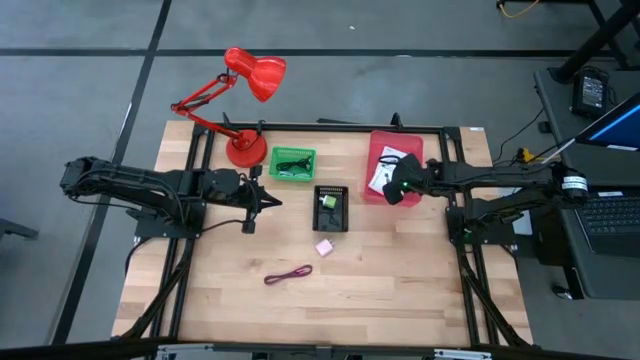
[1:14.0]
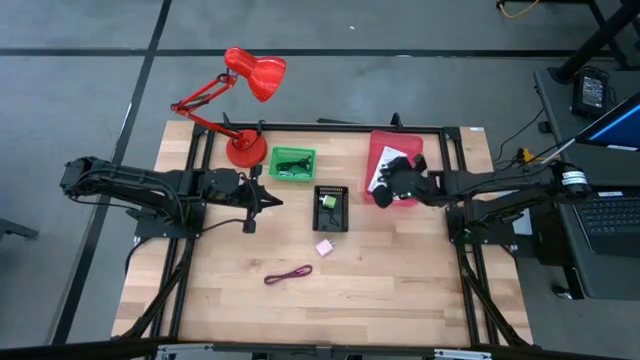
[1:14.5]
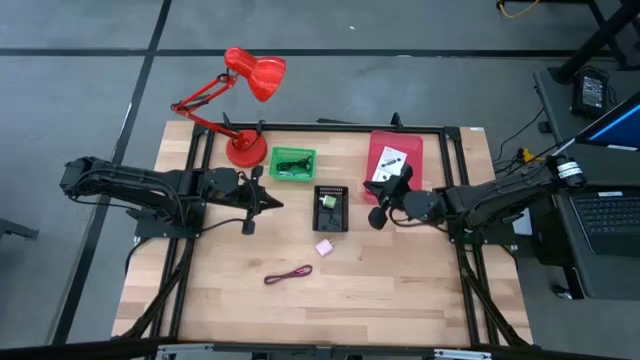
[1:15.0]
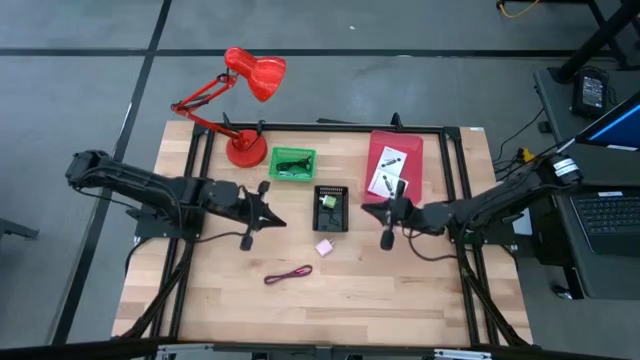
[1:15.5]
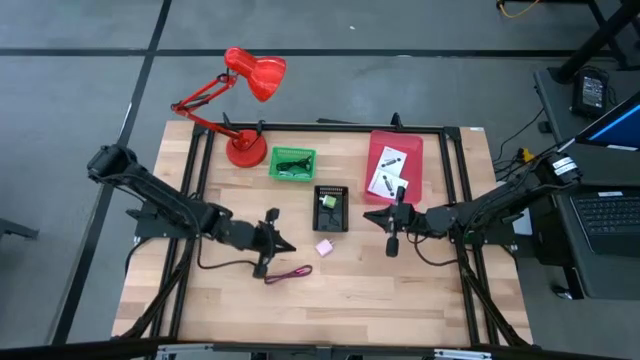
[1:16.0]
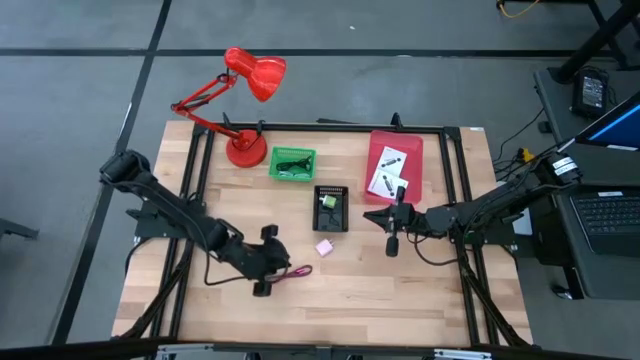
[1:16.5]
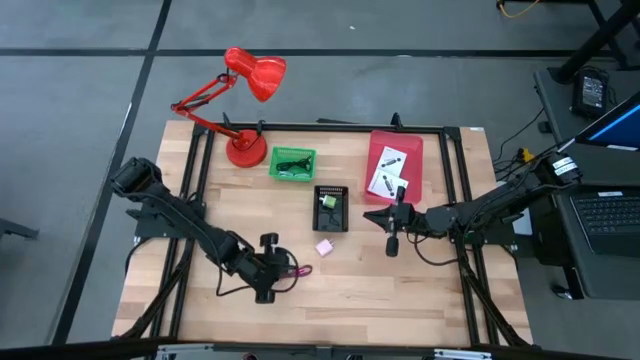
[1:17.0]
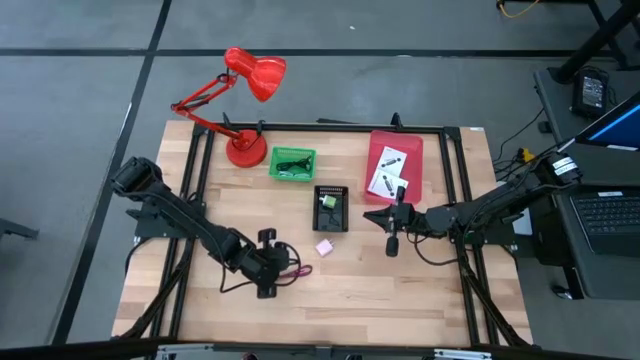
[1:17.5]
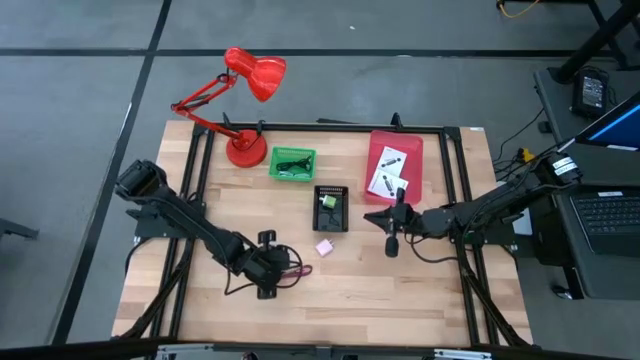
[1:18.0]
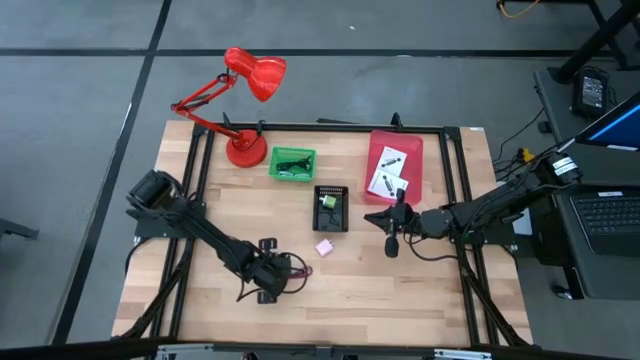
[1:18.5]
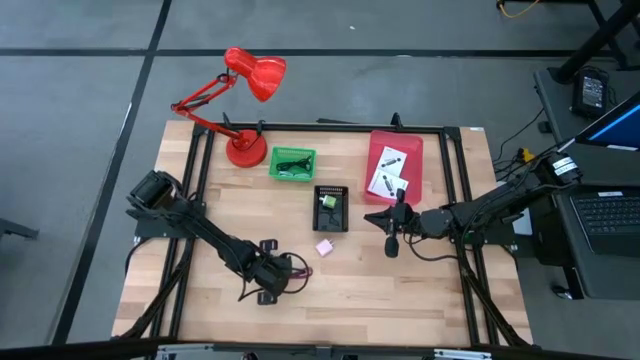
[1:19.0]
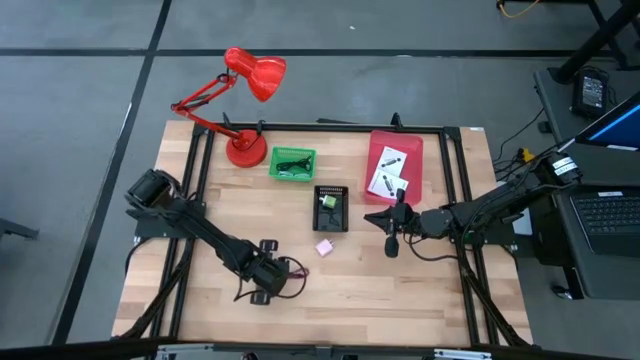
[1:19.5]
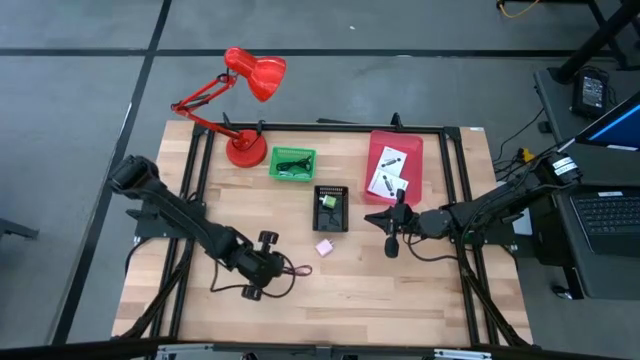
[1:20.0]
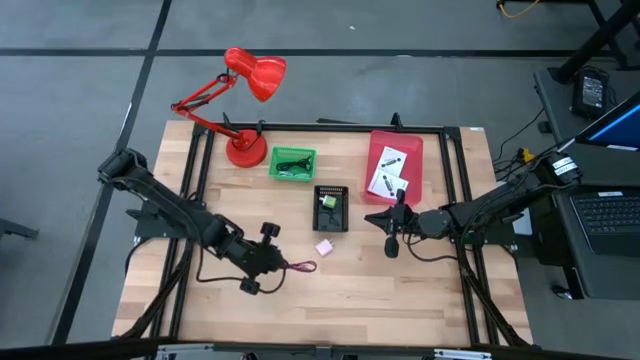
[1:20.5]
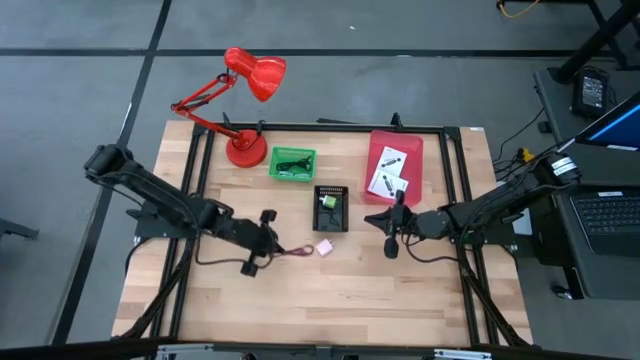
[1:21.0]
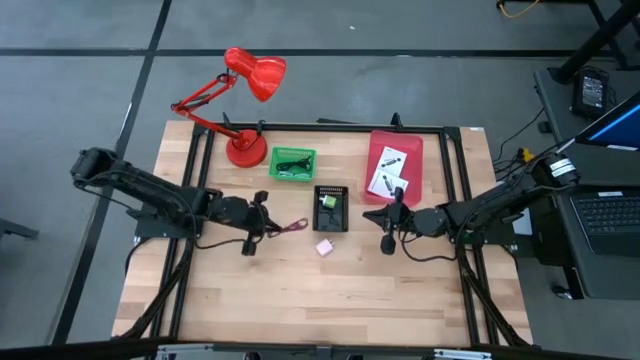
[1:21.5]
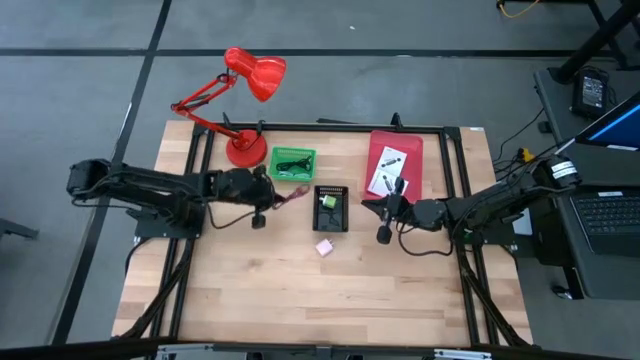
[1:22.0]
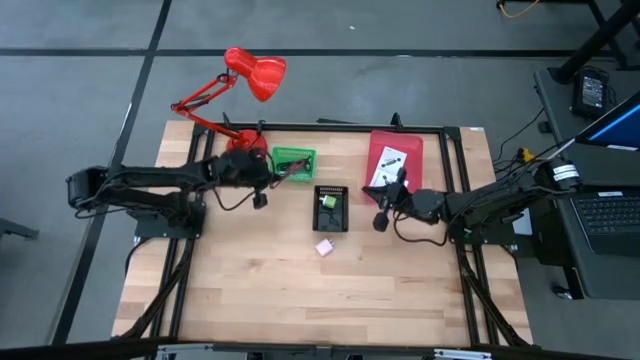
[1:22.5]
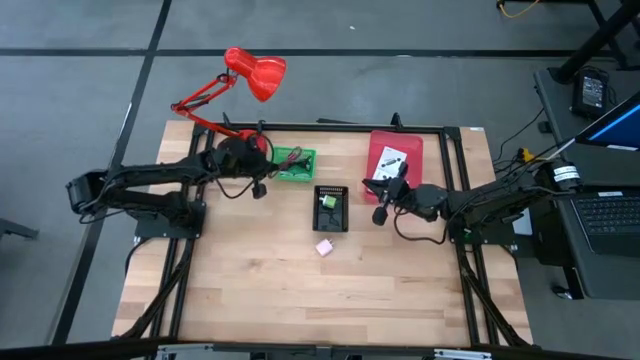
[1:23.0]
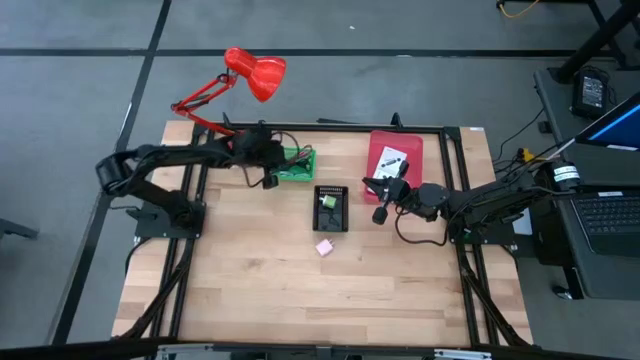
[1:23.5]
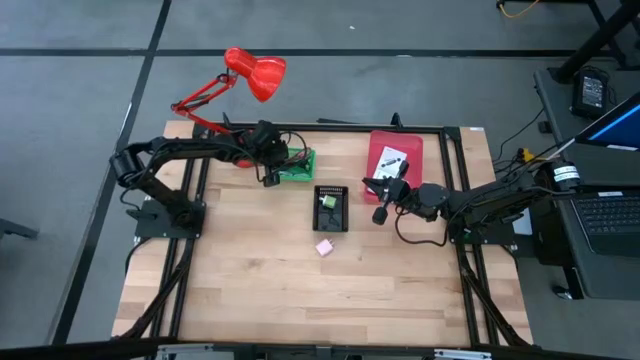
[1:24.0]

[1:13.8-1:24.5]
Task: Pick and place items into bin
Put the pink charger cable into the green bin

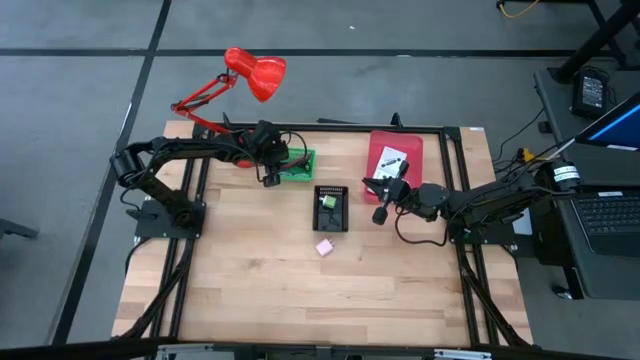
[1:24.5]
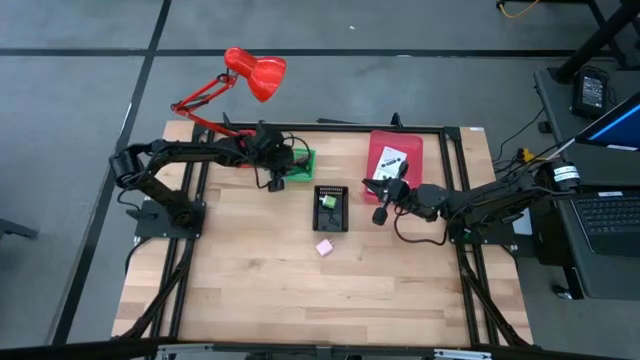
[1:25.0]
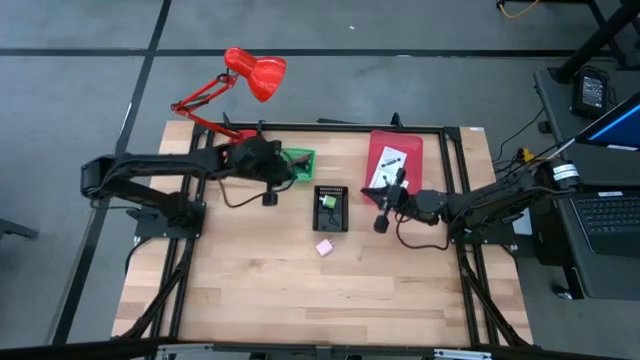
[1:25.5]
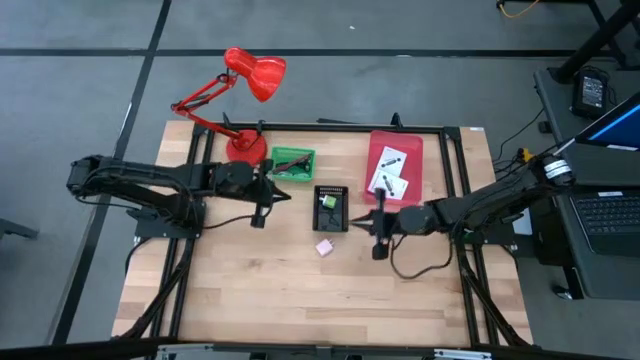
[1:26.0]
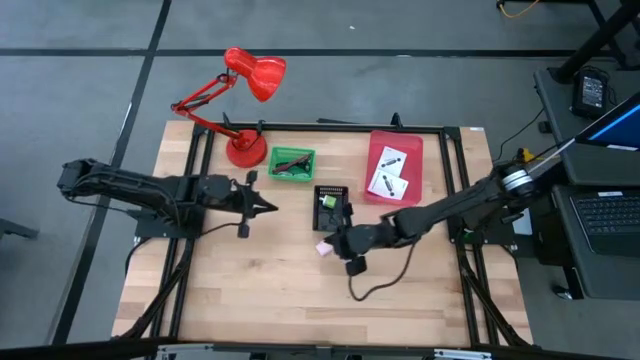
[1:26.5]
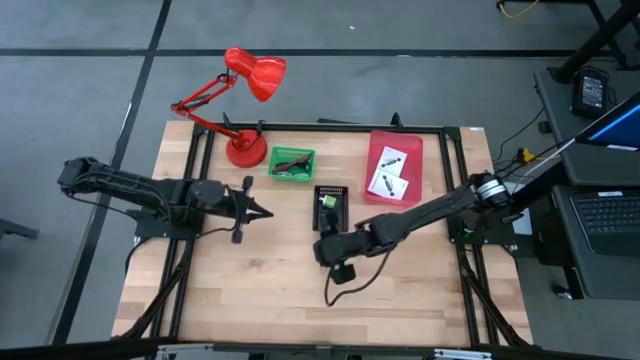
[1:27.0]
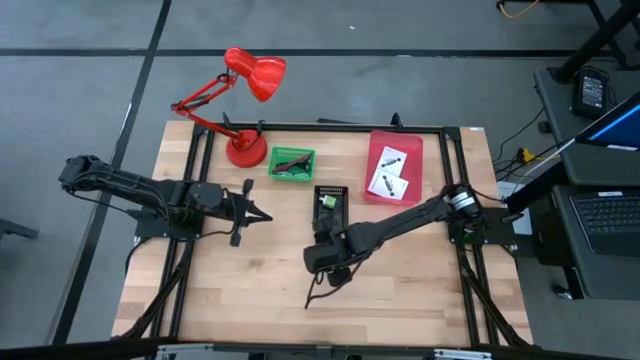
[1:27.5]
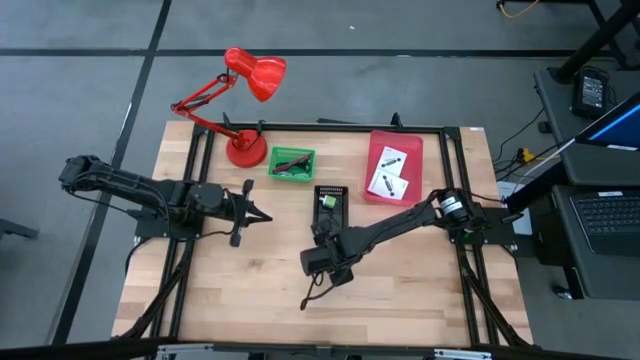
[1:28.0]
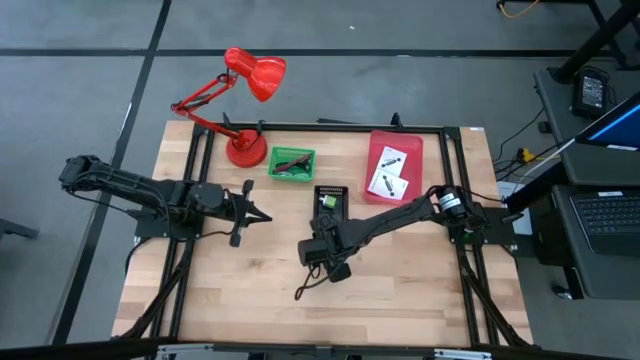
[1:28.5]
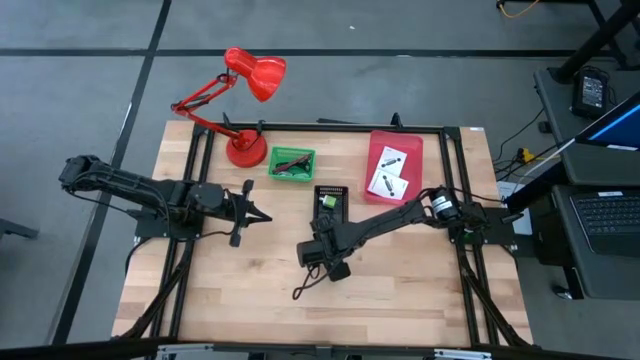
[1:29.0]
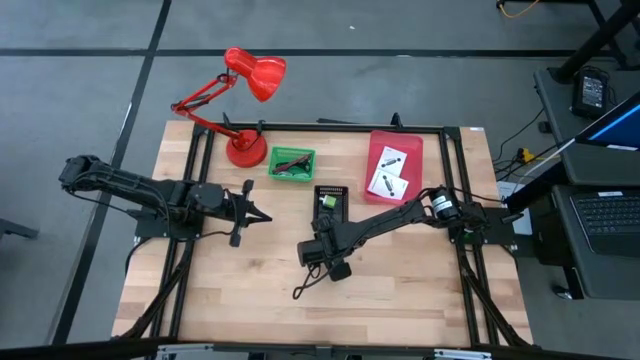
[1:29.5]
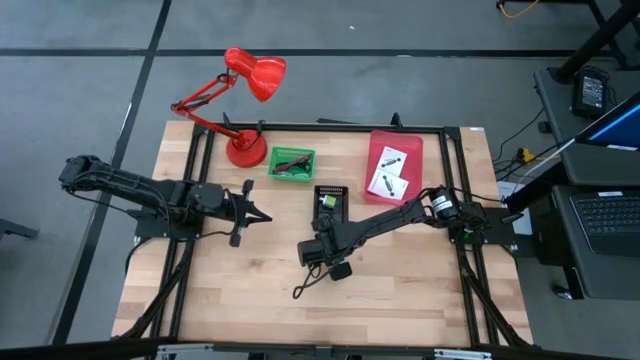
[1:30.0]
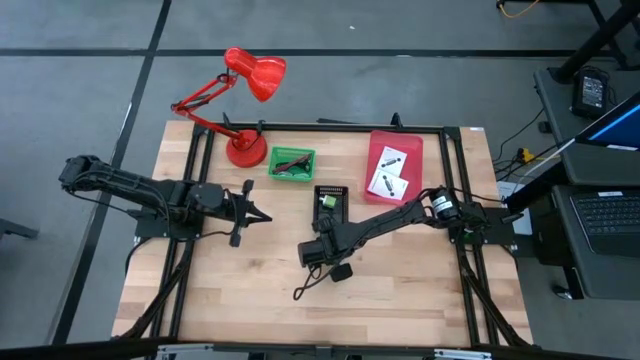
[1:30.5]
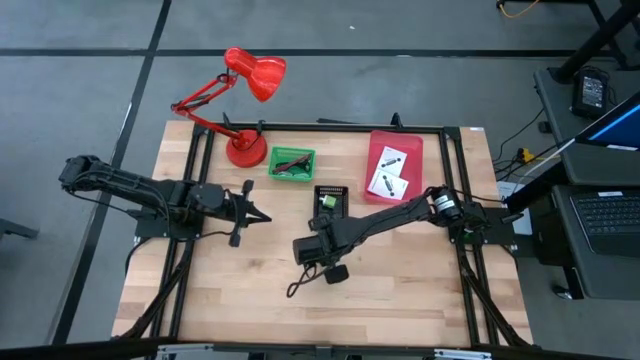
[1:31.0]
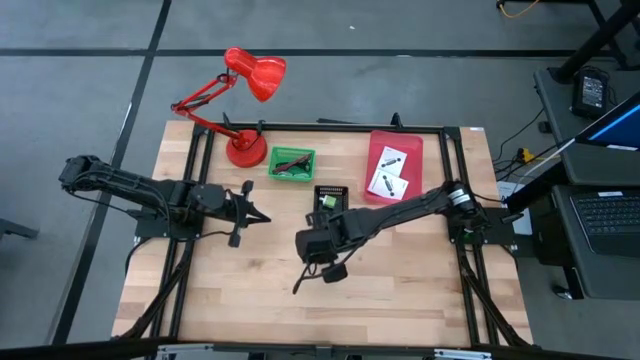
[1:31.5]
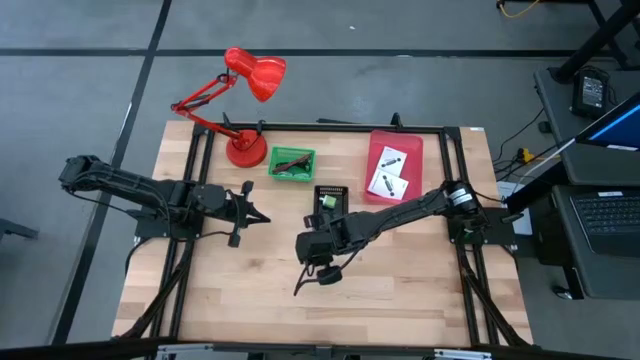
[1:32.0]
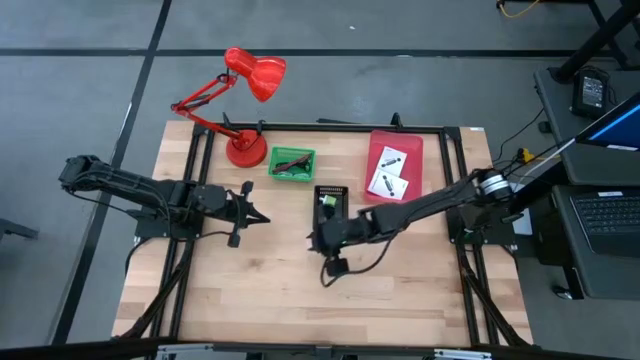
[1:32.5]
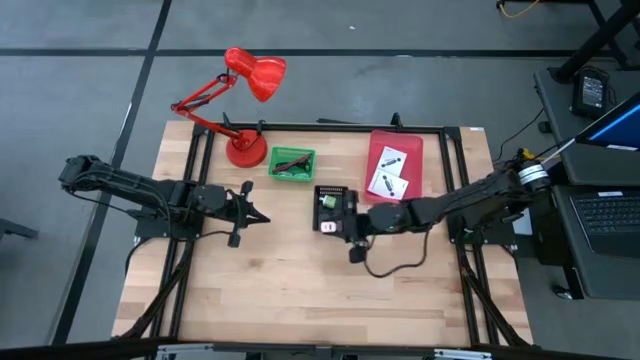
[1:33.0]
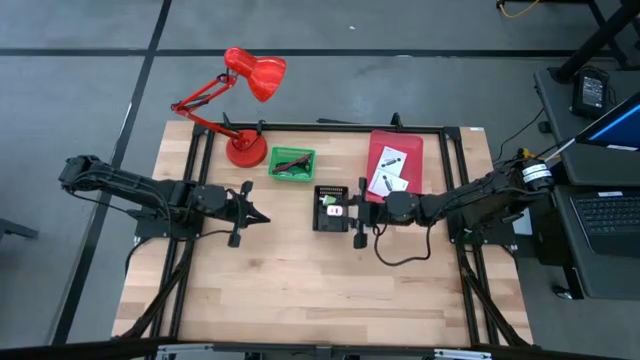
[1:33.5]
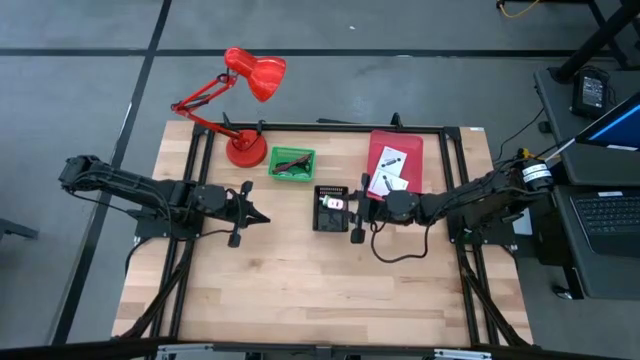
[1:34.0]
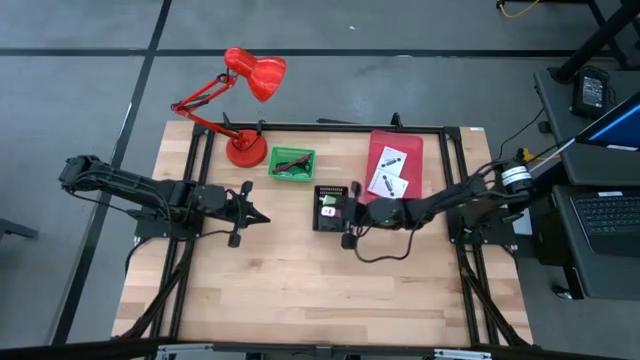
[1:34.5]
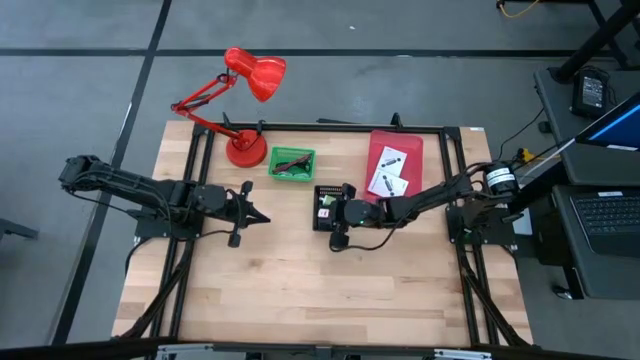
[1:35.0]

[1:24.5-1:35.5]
Put the pink charger adapter into the black bin
